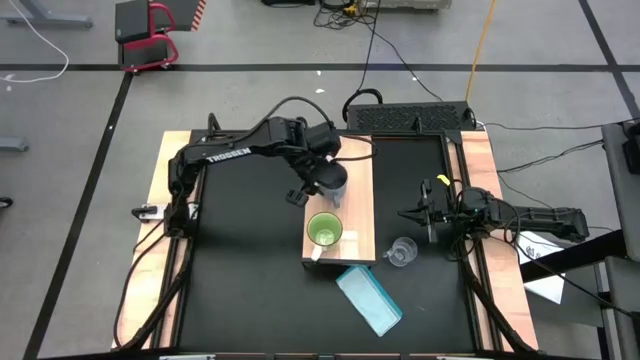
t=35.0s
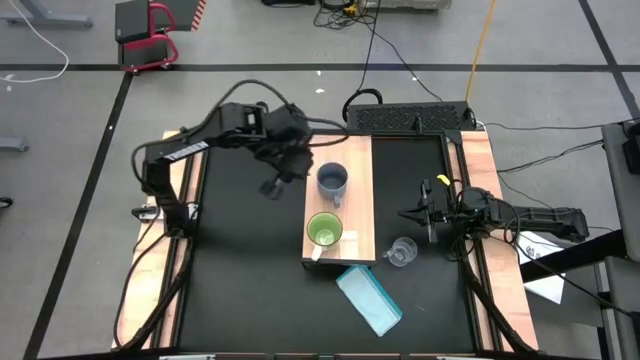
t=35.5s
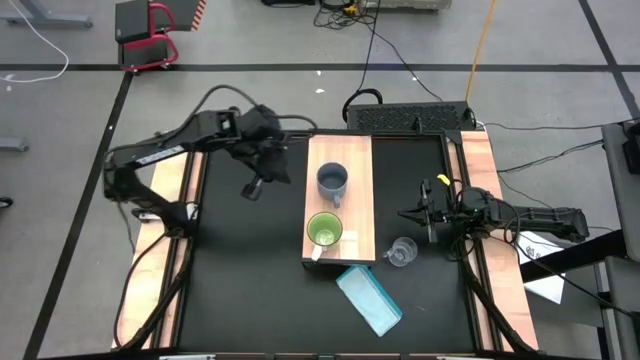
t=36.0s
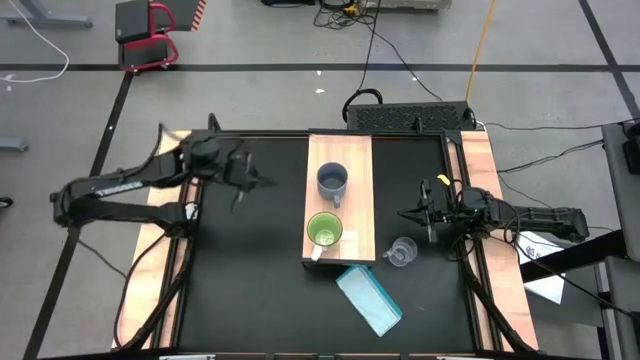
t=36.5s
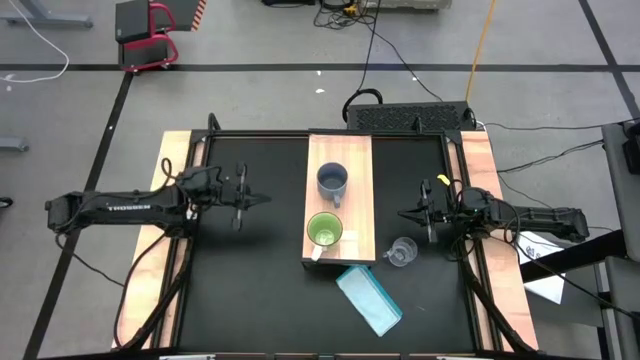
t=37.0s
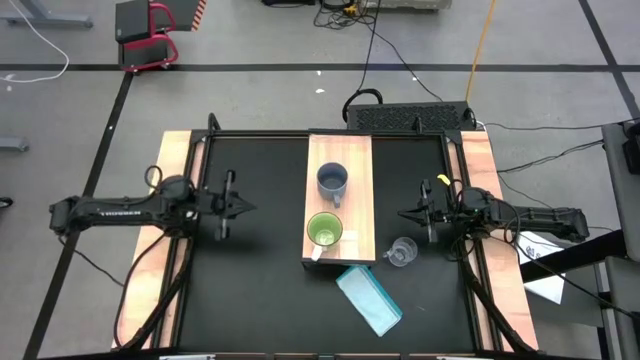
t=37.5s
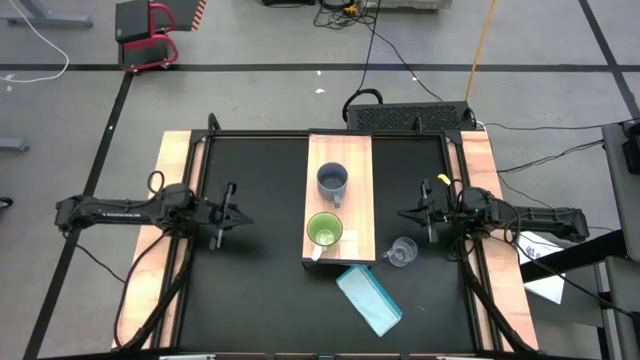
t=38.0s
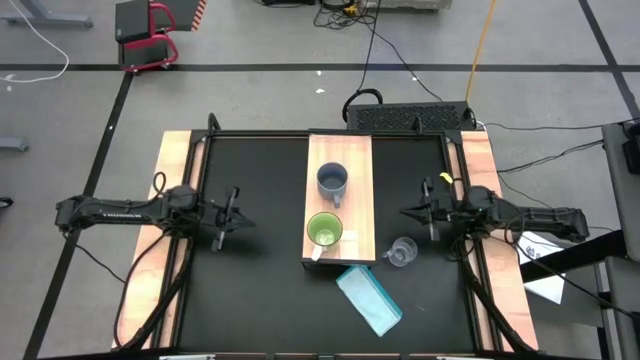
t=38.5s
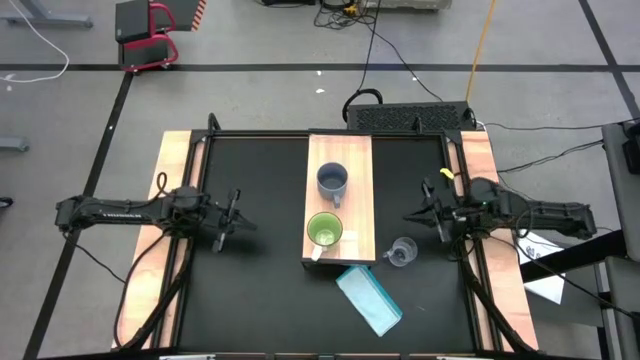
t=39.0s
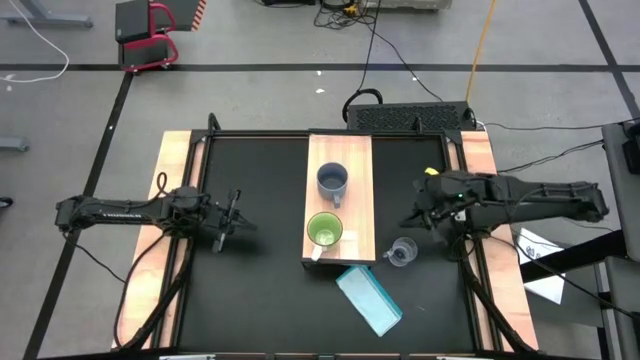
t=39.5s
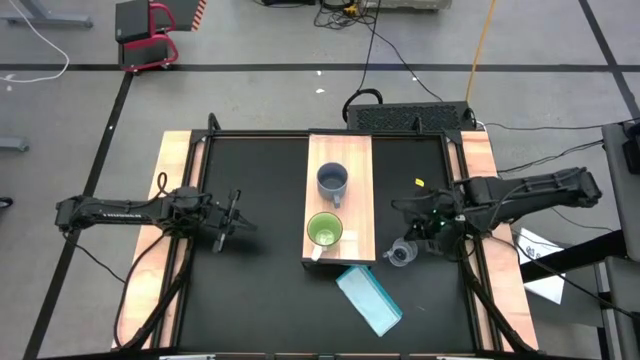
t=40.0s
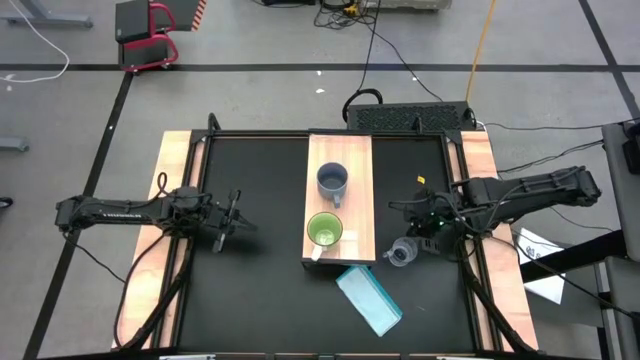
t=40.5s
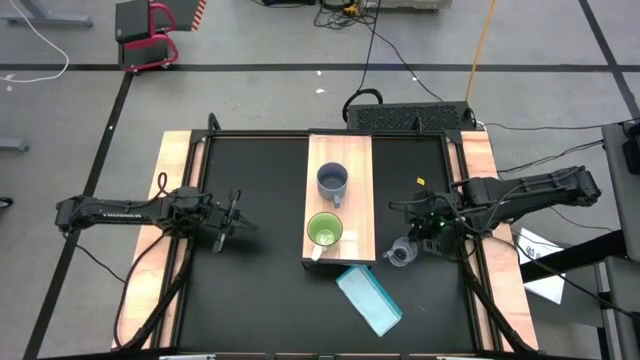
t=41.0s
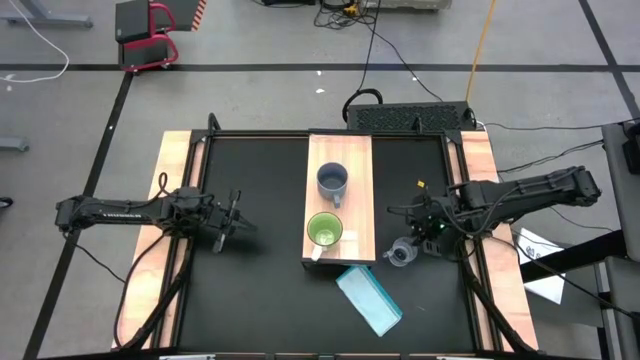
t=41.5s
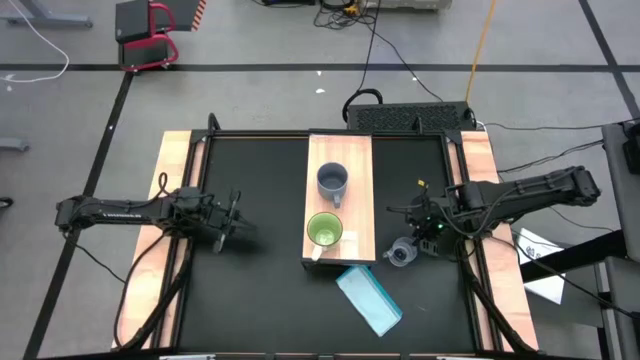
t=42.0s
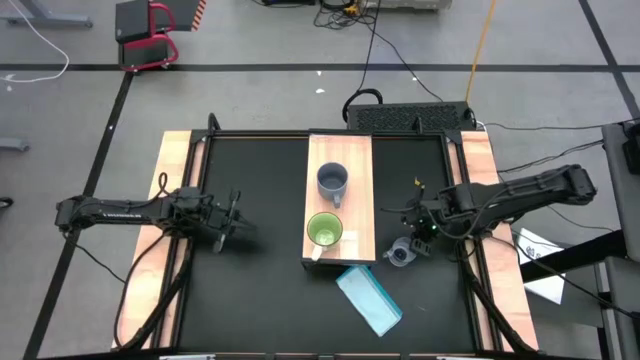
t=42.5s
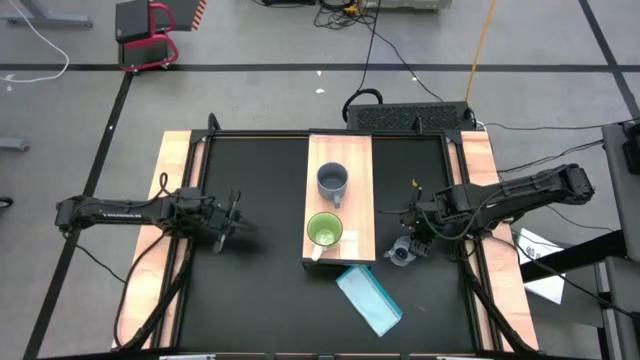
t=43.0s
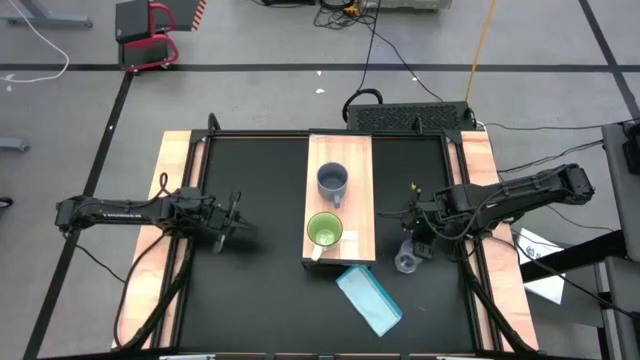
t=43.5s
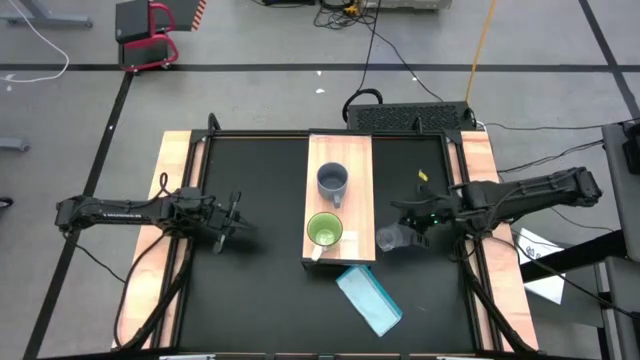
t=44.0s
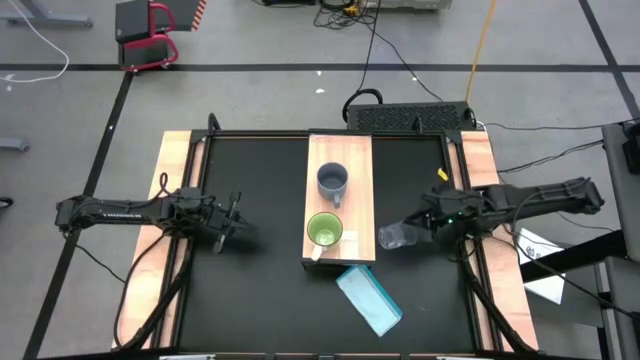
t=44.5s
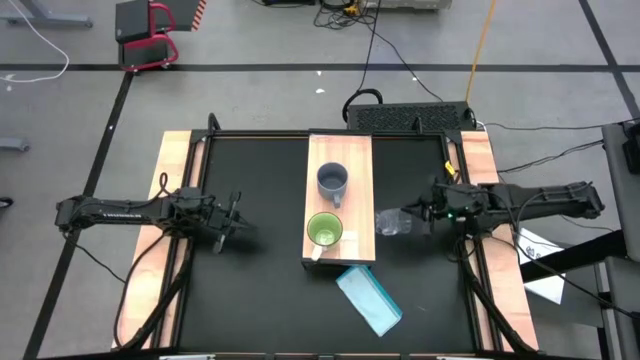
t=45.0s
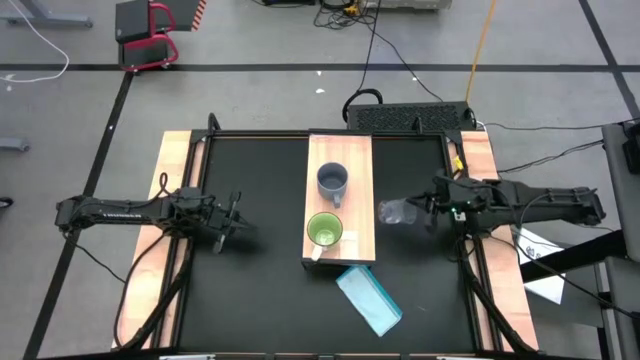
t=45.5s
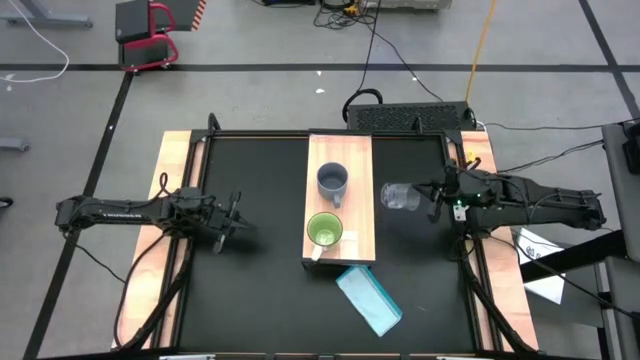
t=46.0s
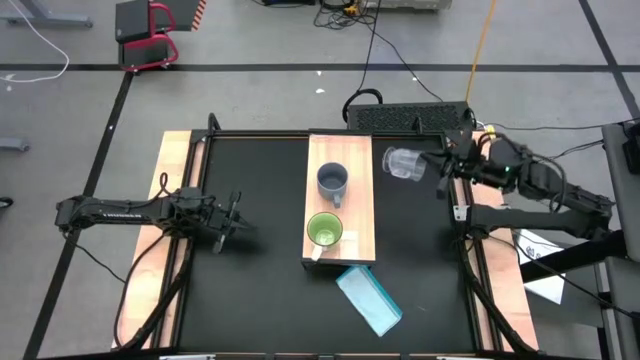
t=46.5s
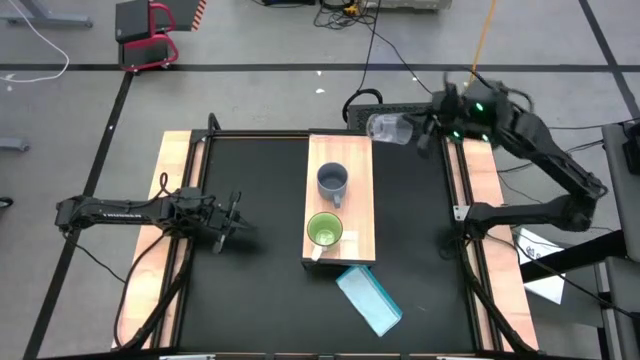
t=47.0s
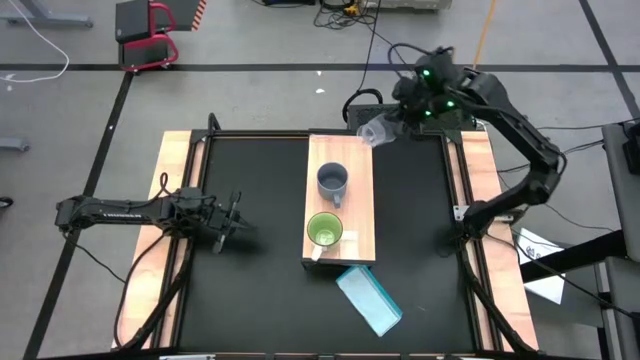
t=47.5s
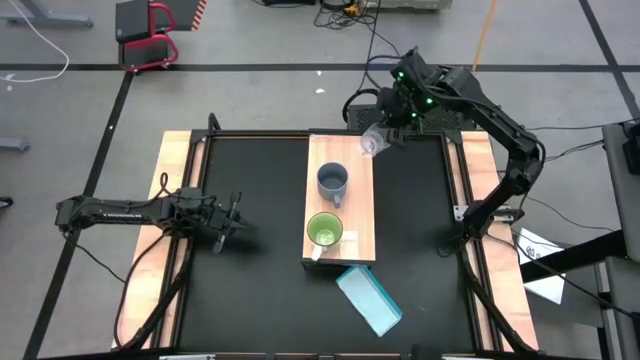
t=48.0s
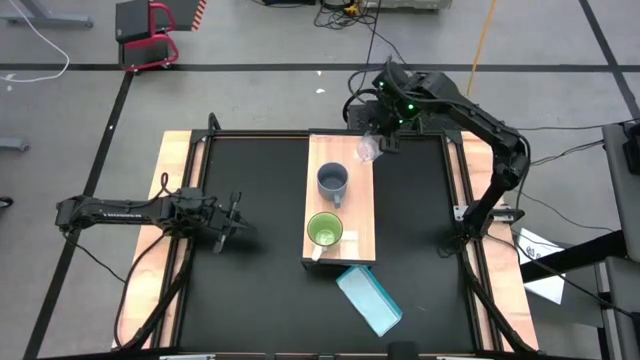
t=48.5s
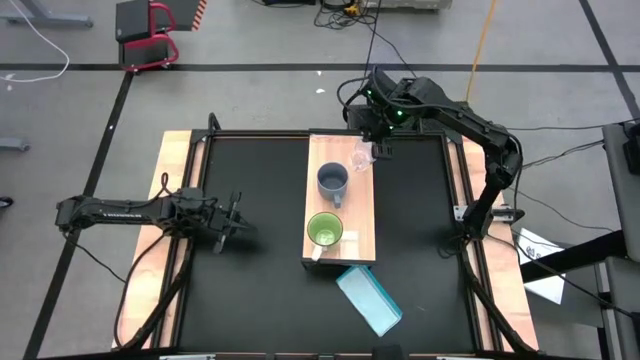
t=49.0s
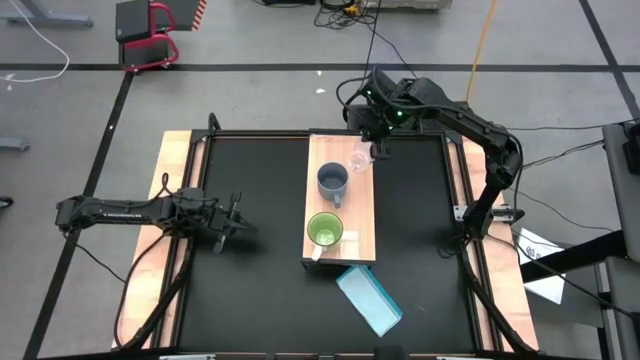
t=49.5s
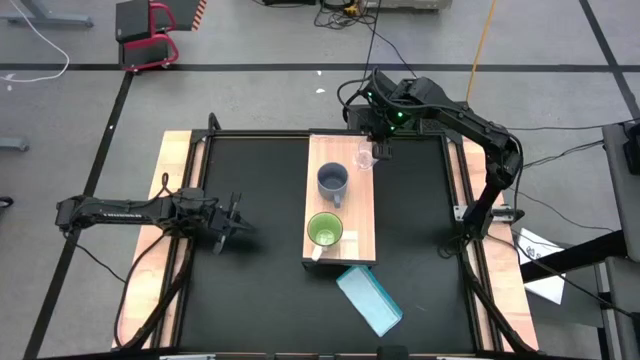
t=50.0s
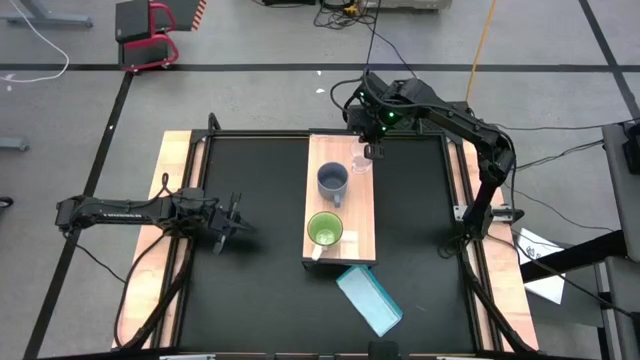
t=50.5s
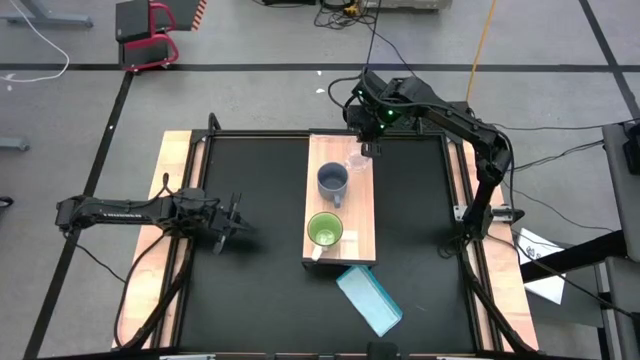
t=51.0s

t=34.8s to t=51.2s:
Task: Stack small to large cups/mugs on shelf
Put the transparent mug on the shelf

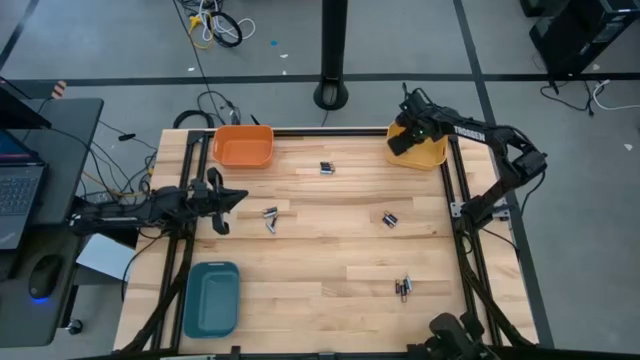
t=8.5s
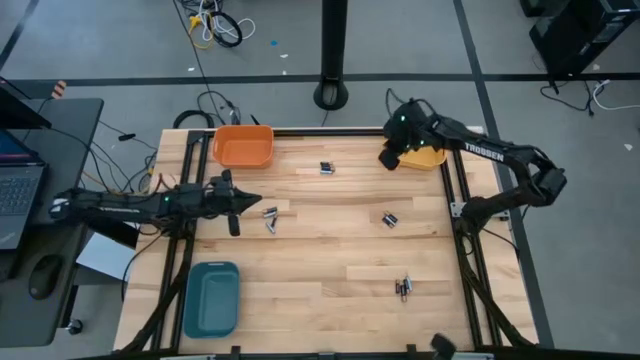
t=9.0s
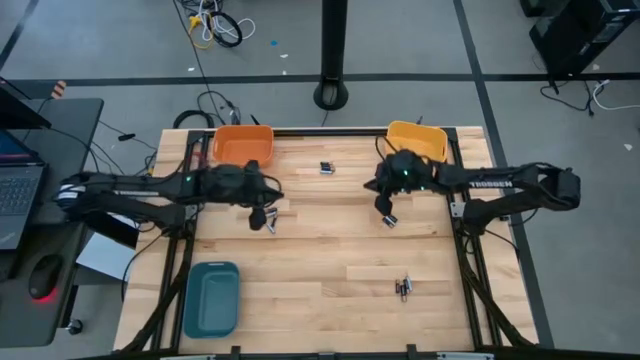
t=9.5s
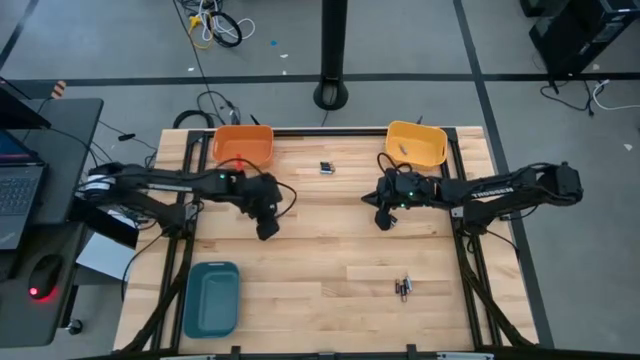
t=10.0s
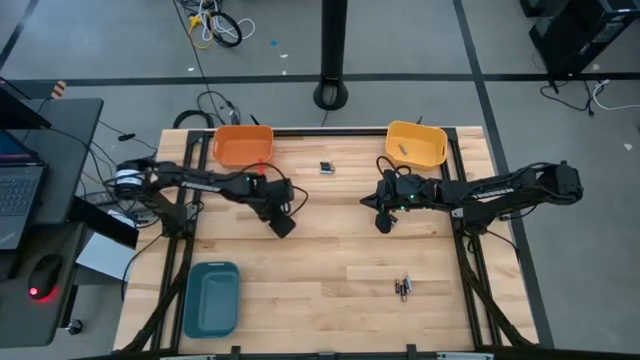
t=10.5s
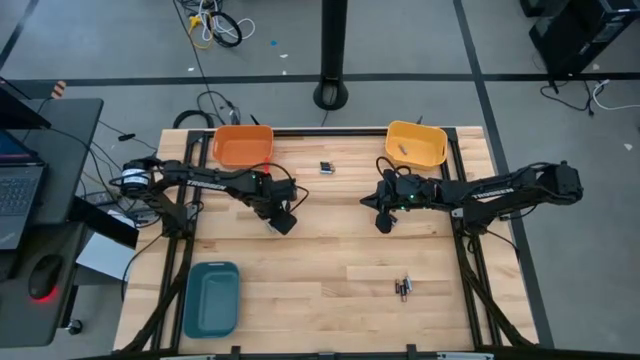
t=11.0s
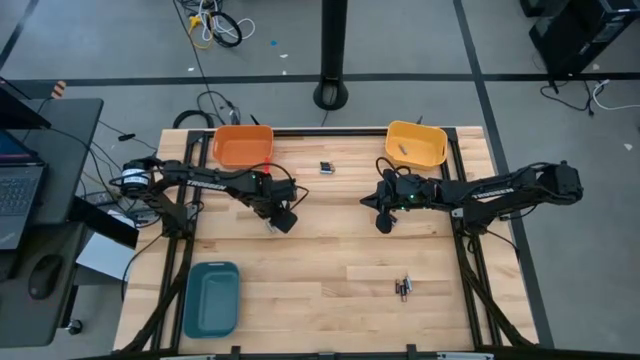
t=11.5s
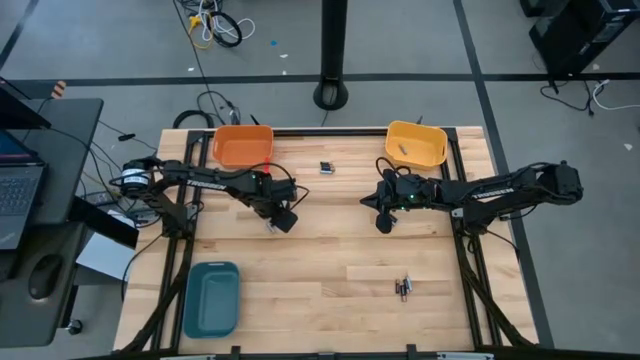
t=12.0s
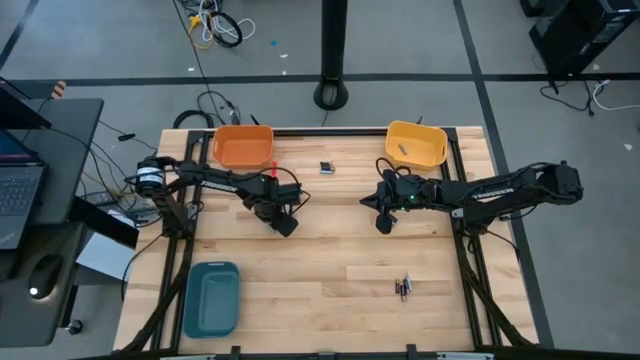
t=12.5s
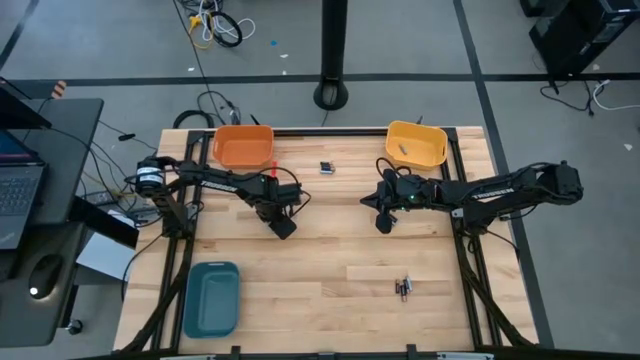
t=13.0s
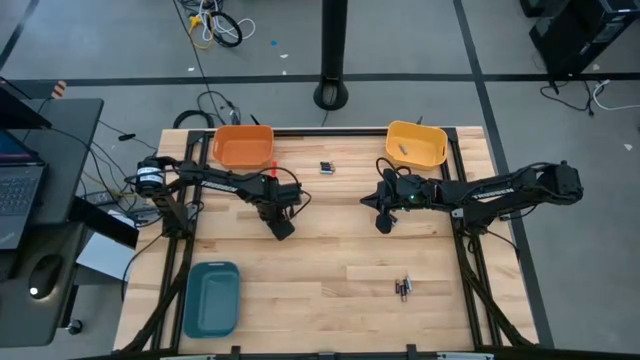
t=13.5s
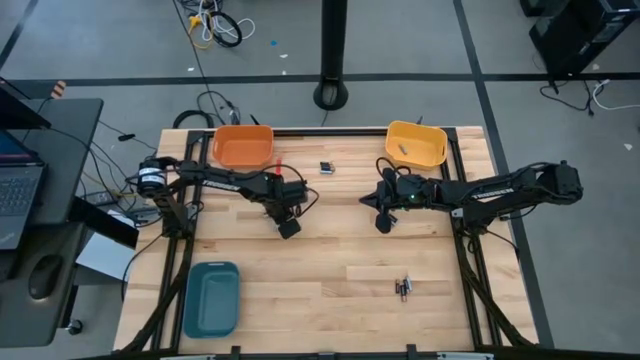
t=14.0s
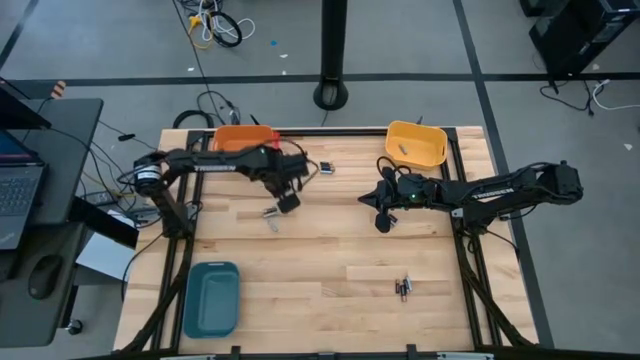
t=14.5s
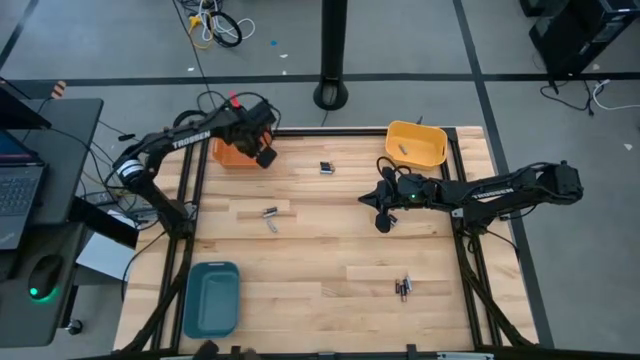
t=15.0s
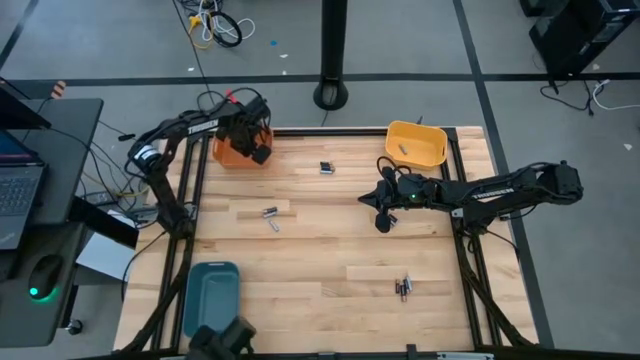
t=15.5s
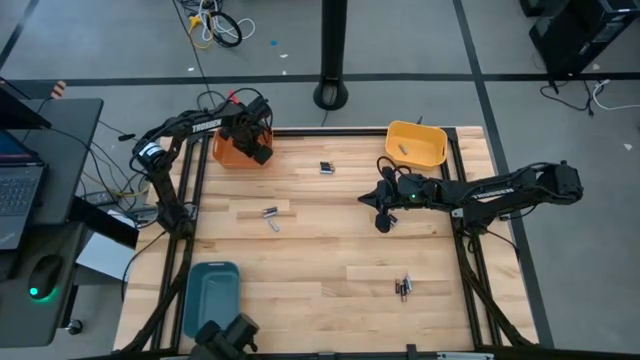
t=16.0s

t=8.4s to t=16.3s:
Task: Sort batteries
Put the small copper and black battery into the orange bin
